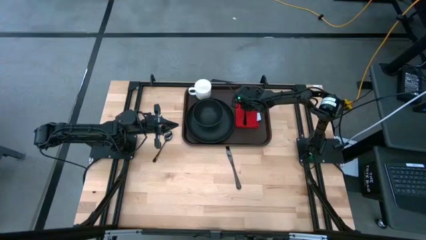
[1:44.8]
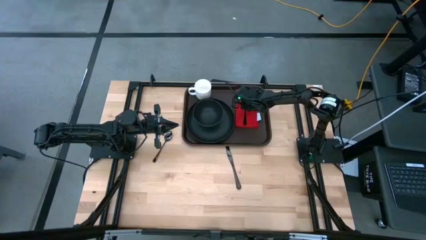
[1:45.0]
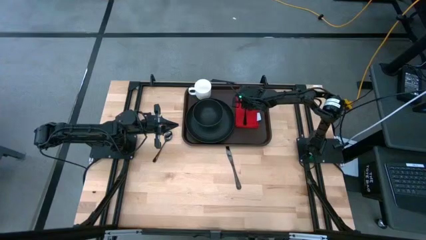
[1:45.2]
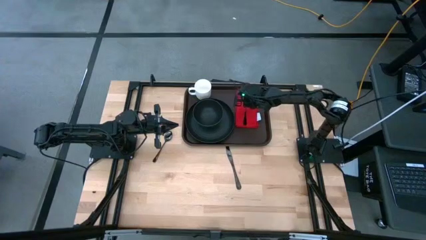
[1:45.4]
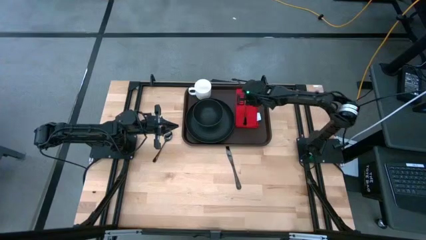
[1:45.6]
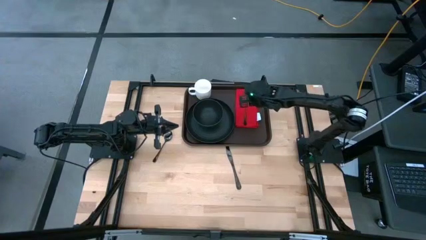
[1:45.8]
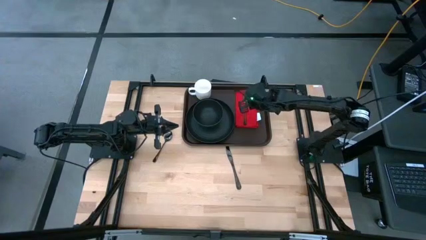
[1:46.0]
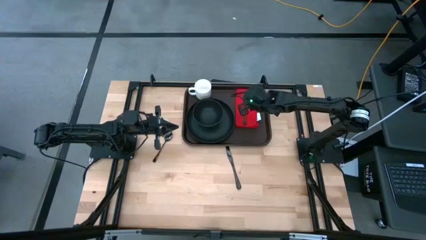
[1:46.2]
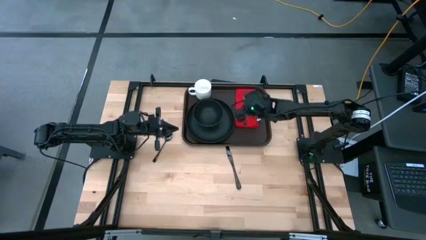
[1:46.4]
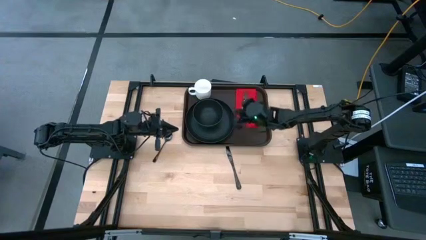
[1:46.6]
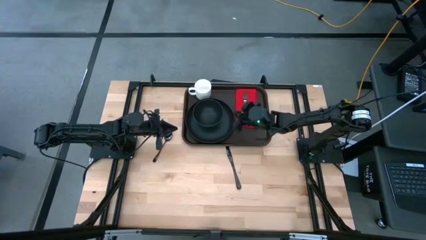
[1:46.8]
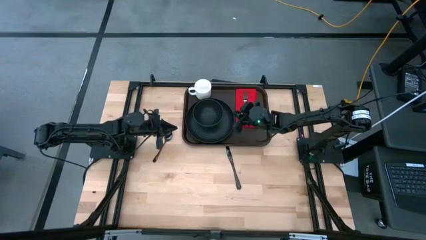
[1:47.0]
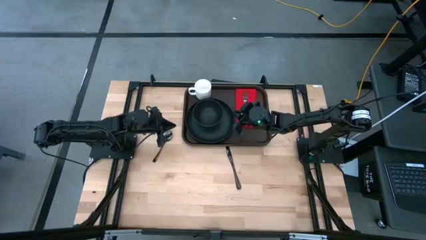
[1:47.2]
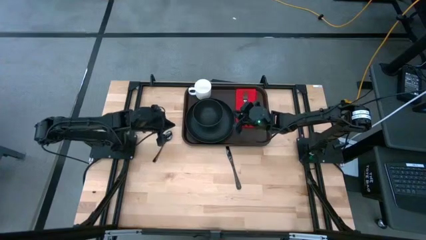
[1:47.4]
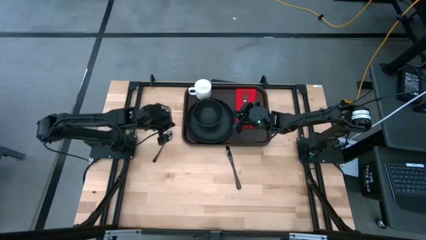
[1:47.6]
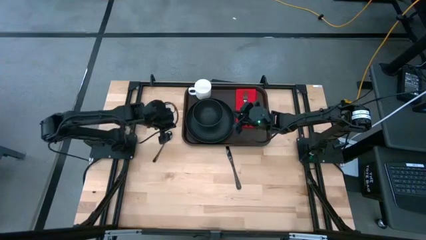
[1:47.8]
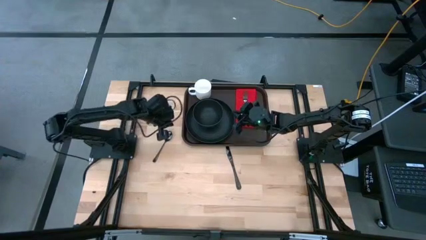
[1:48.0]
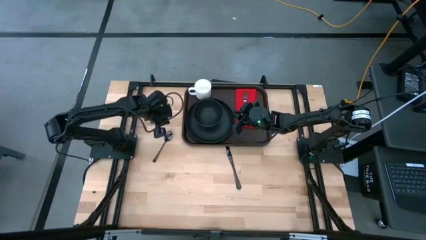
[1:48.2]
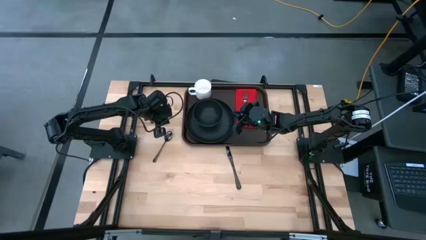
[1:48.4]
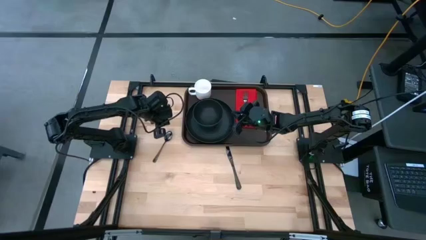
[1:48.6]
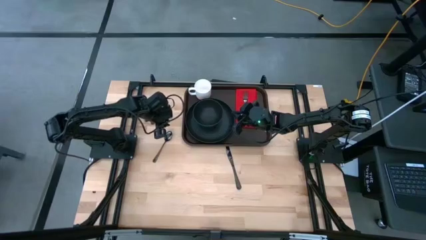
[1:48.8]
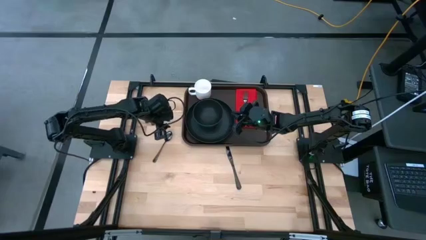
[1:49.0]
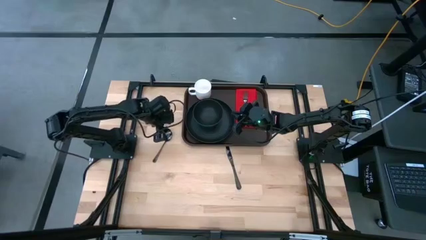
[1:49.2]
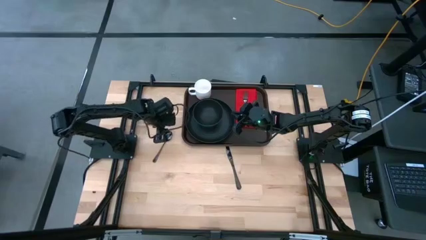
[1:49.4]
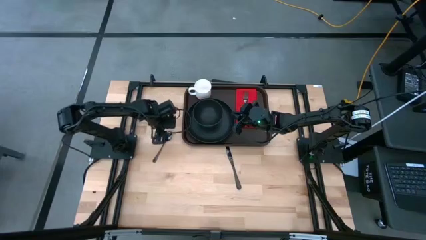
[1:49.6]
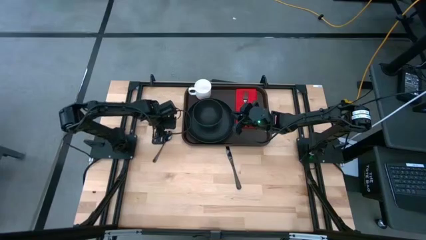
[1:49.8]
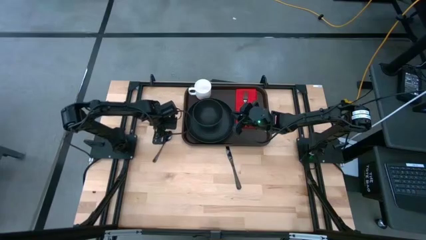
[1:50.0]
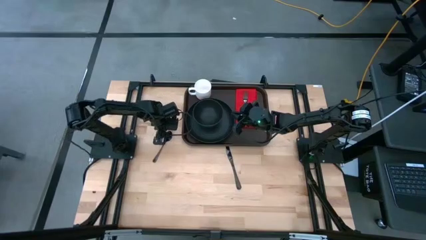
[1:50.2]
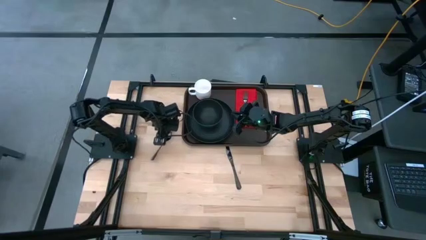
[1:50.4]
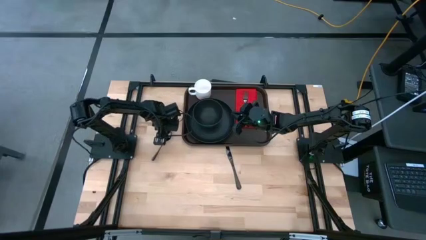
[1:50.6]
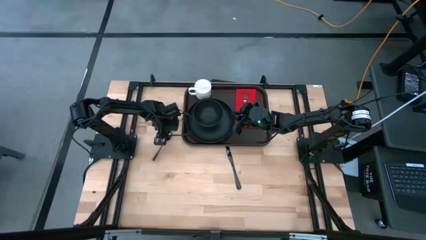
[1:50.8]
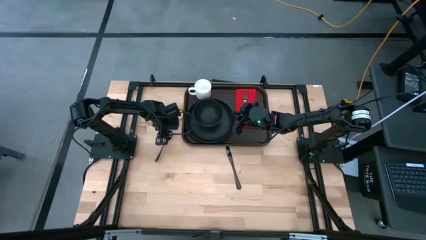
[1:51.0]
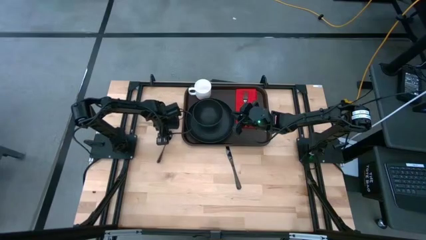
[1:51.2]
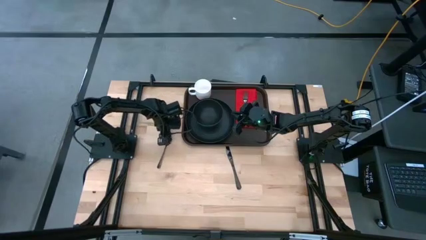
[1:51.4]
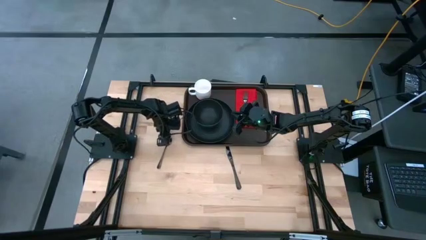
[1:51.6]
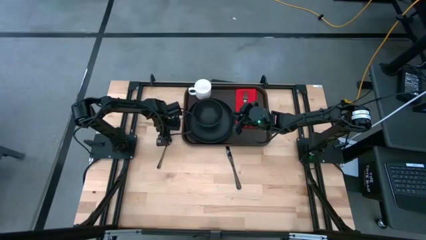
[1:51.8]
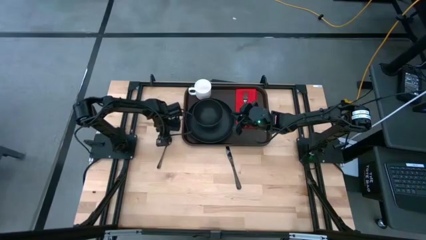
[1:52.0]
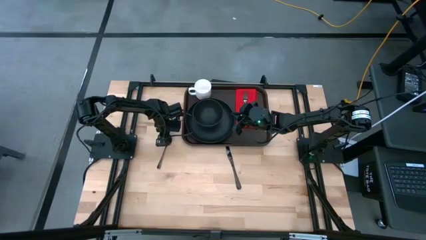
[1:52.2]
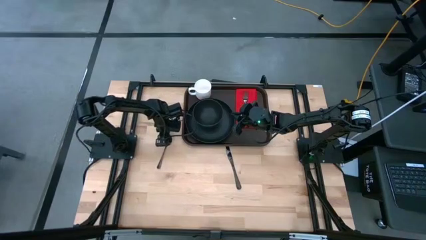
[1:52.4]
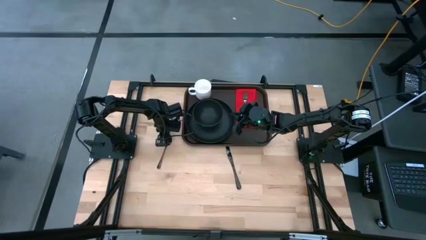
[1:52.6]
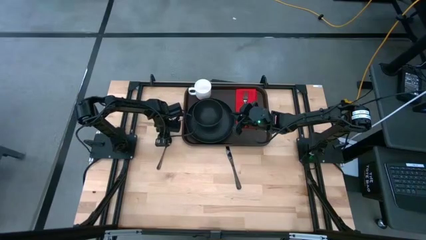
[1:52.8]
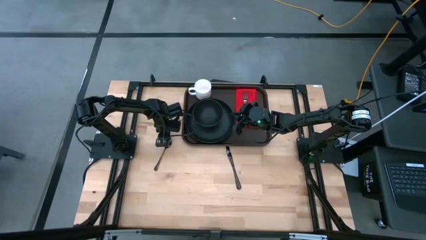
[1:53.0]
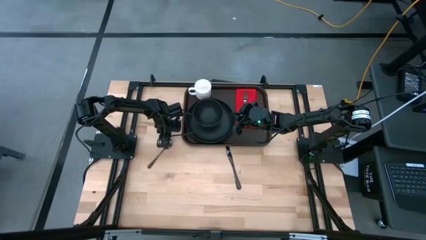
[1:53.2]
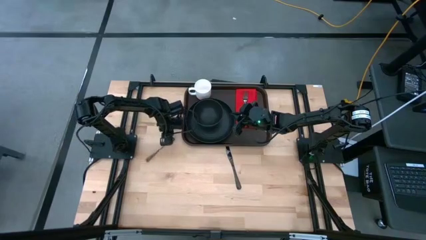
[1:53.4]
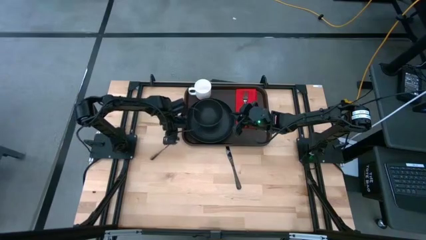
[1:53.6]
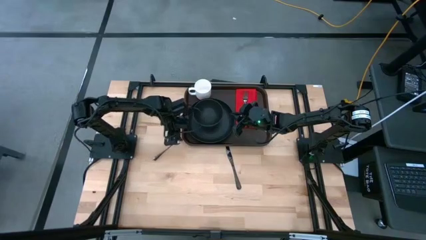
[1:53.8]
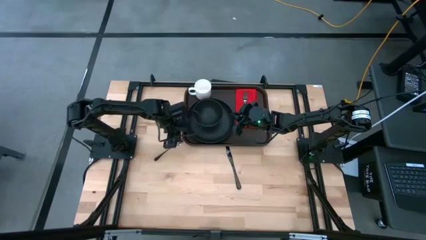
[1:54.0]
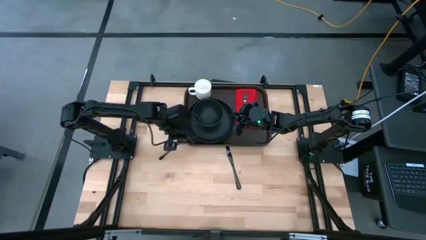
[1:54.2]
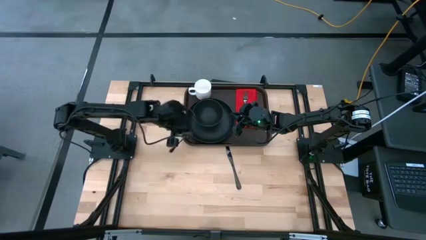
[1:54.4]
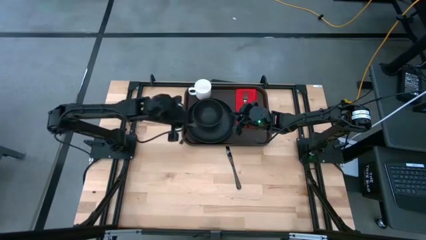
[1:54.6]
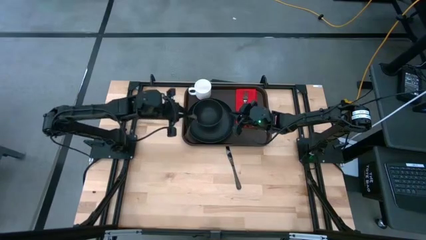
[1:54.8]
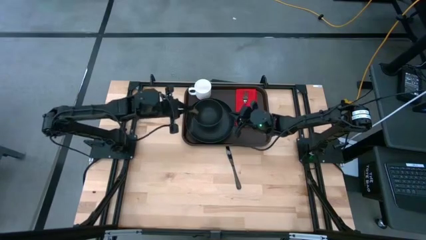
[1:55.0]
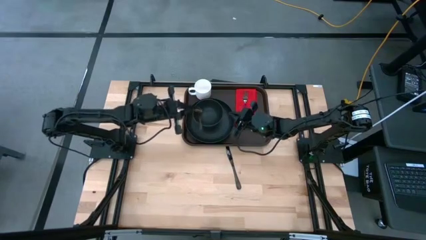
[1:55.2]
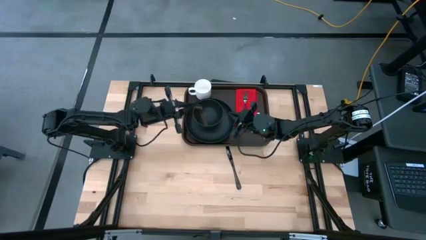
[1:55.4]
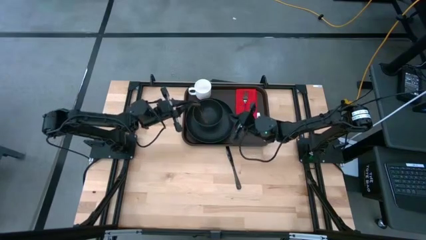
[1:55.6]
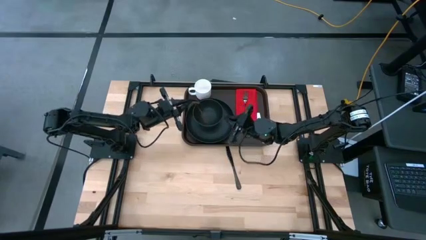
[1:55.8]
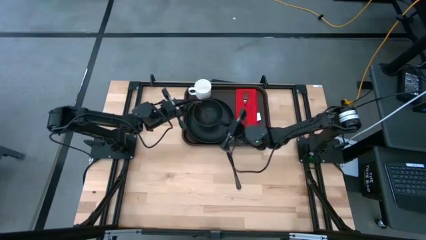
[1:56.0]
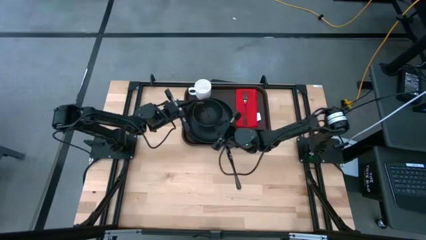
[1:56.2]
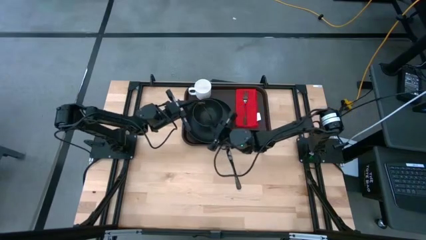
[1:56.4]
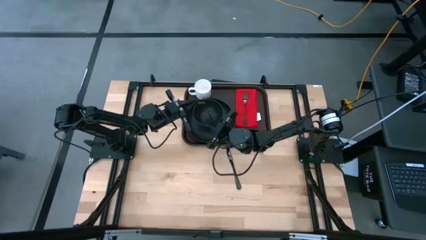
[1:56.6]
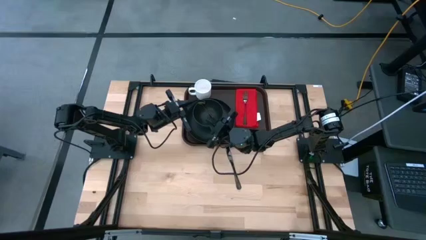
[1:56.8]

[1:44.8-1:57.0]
Task: Set up tray
Put the black spoon on the red table napkin to the left of the black fork
